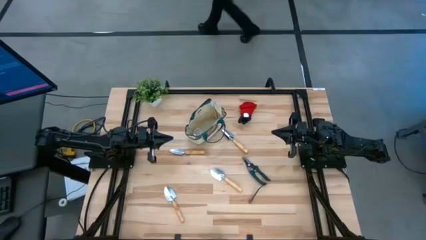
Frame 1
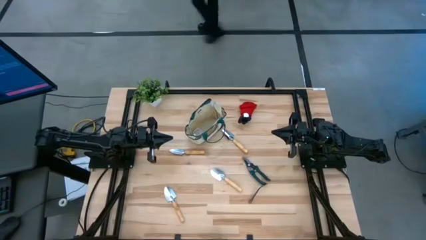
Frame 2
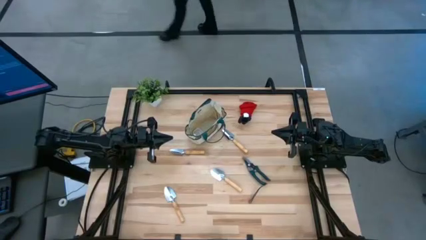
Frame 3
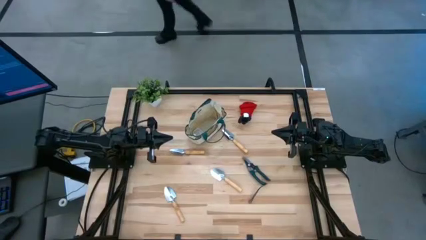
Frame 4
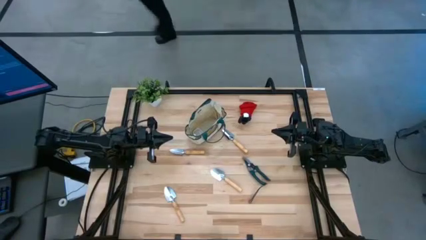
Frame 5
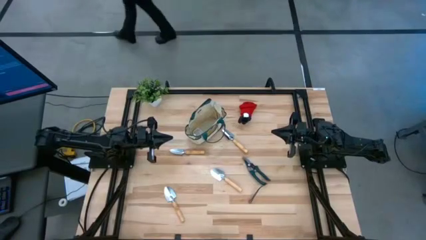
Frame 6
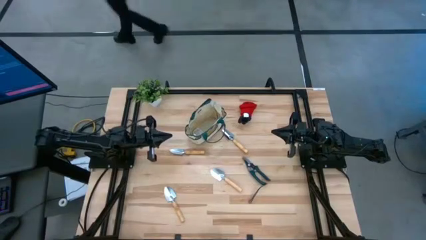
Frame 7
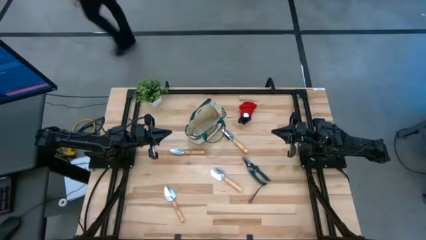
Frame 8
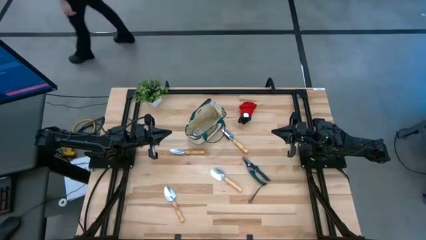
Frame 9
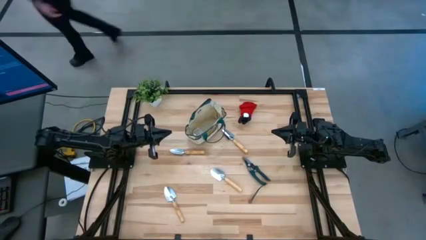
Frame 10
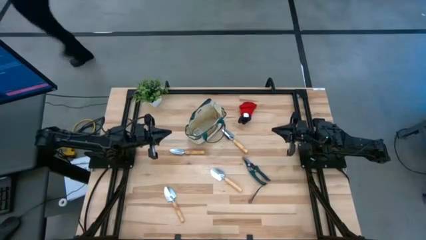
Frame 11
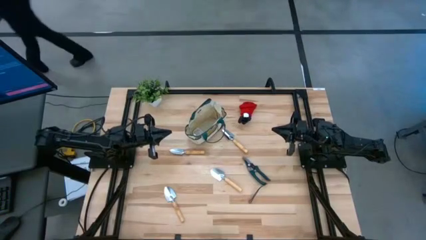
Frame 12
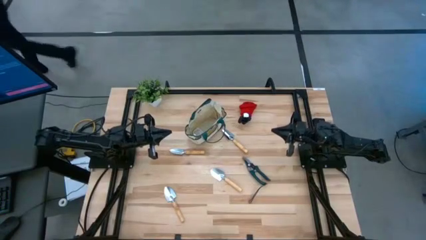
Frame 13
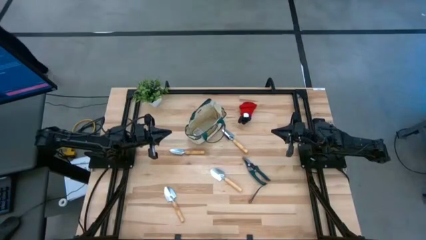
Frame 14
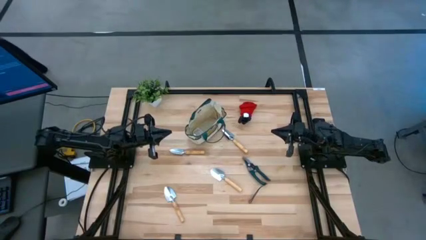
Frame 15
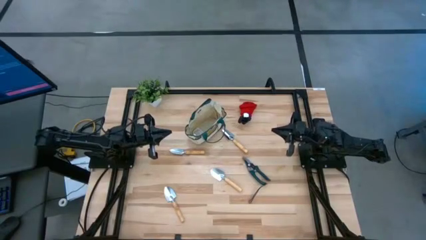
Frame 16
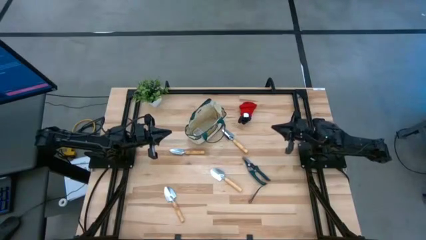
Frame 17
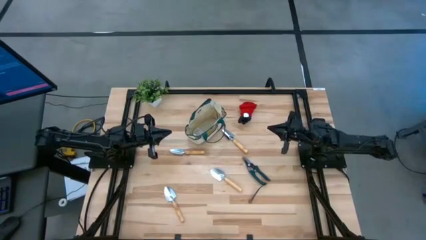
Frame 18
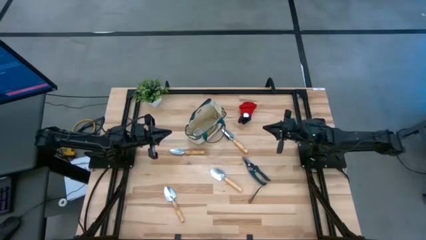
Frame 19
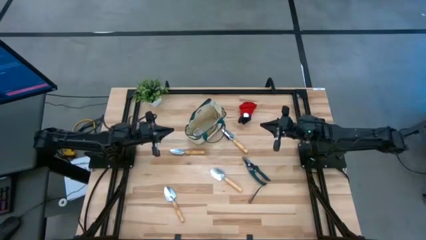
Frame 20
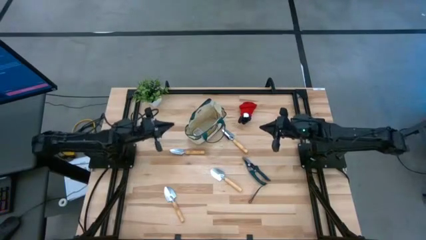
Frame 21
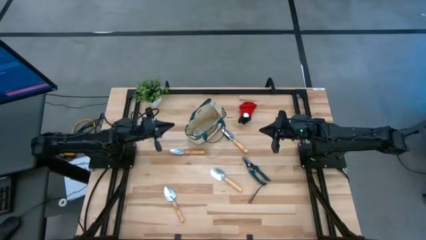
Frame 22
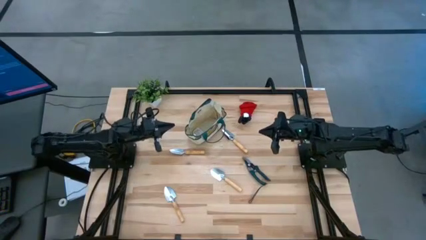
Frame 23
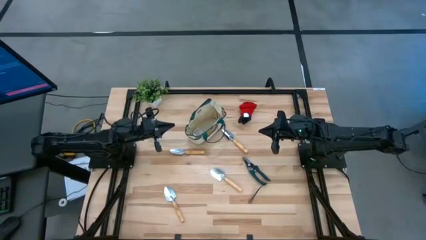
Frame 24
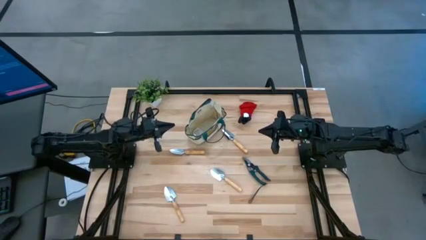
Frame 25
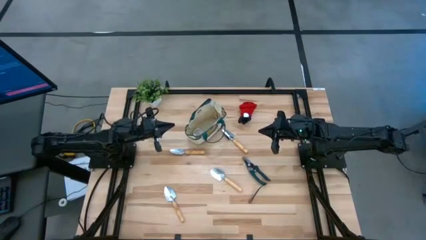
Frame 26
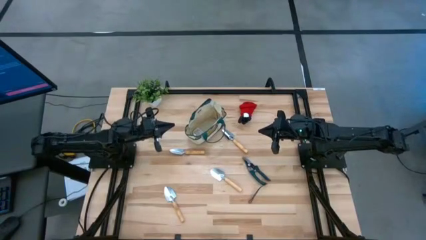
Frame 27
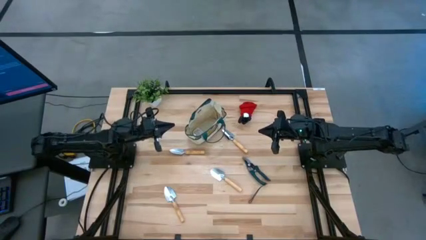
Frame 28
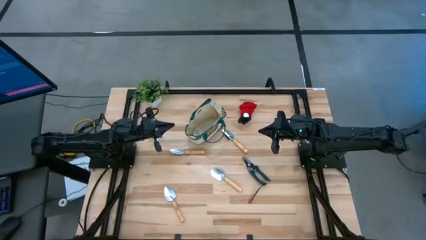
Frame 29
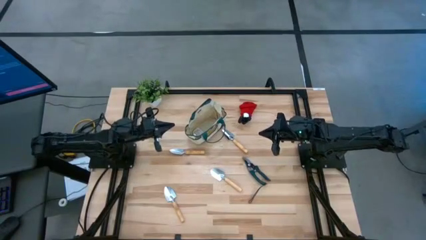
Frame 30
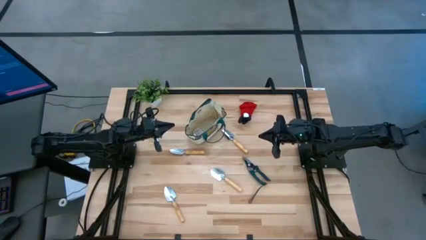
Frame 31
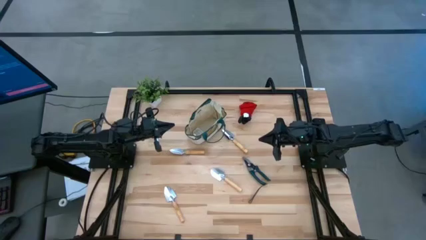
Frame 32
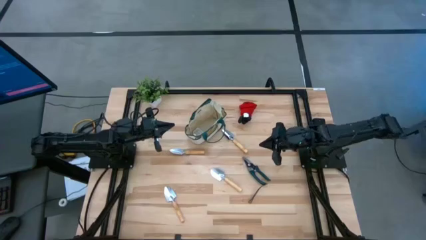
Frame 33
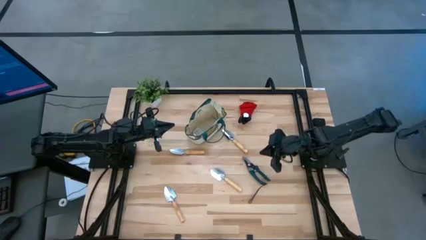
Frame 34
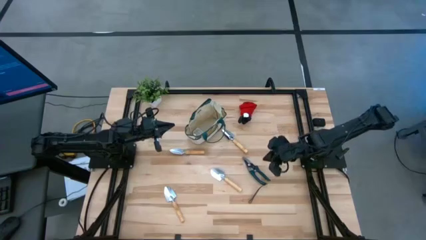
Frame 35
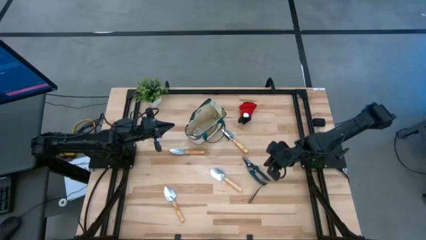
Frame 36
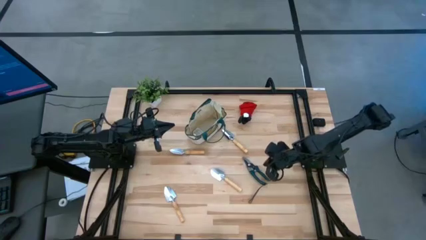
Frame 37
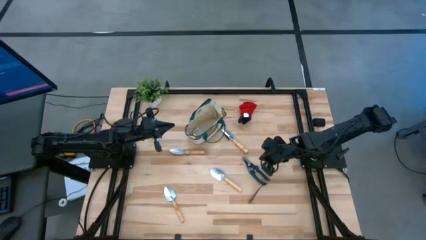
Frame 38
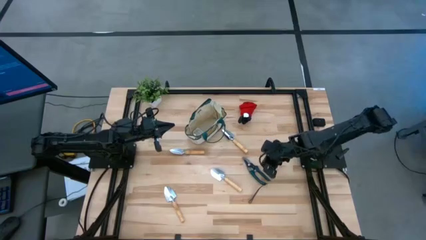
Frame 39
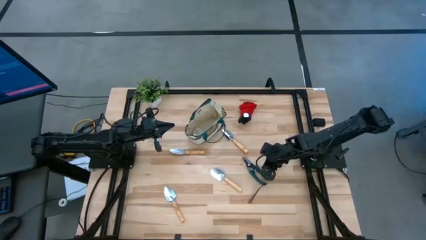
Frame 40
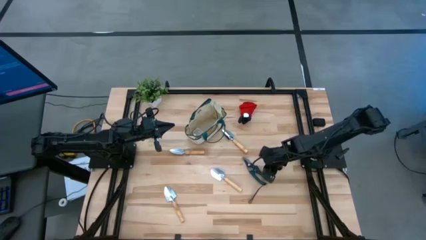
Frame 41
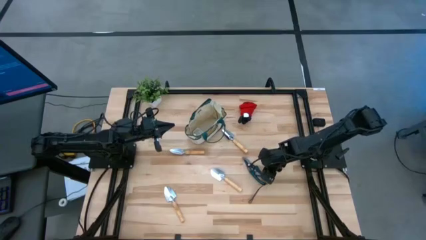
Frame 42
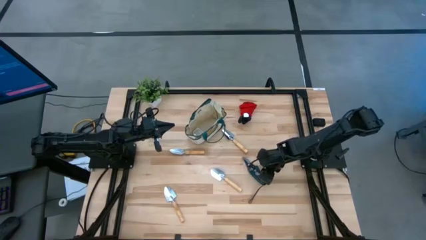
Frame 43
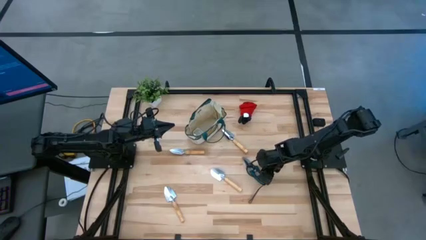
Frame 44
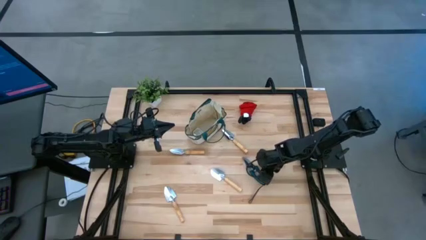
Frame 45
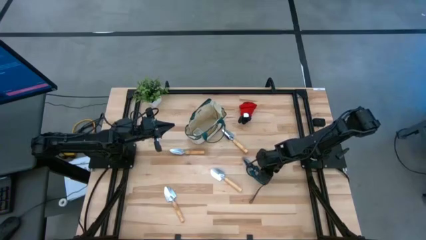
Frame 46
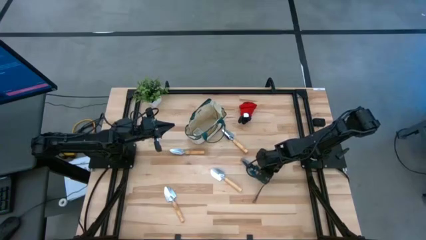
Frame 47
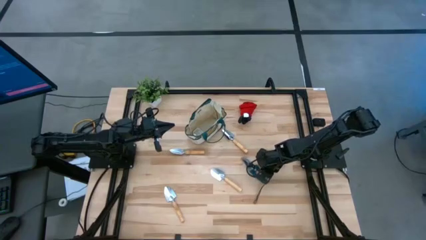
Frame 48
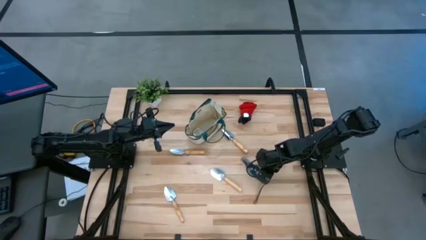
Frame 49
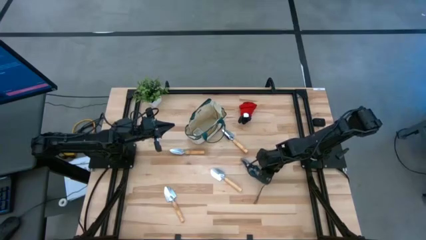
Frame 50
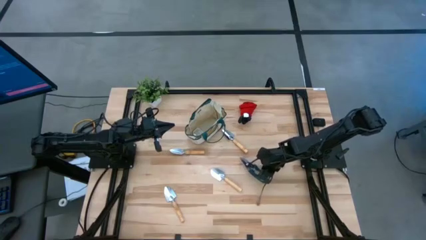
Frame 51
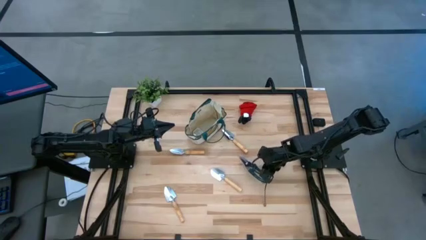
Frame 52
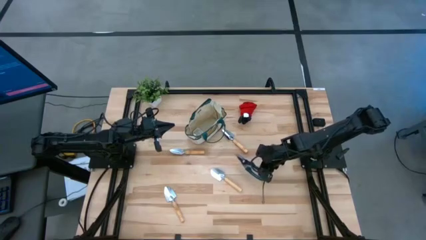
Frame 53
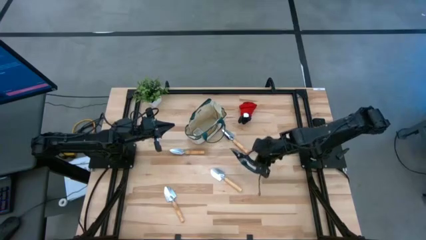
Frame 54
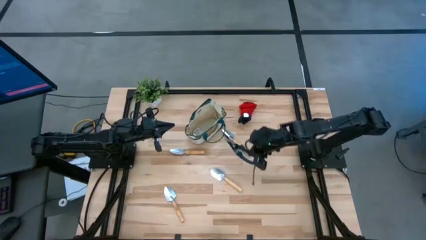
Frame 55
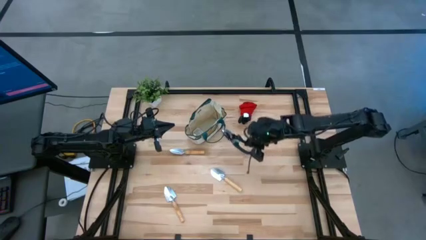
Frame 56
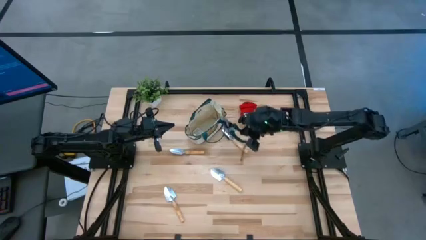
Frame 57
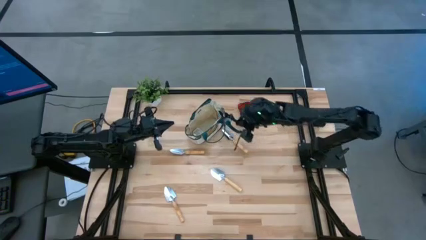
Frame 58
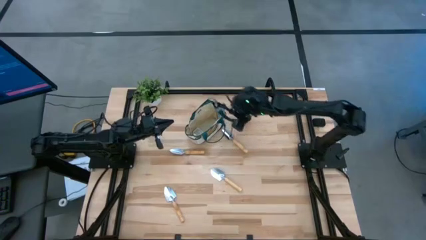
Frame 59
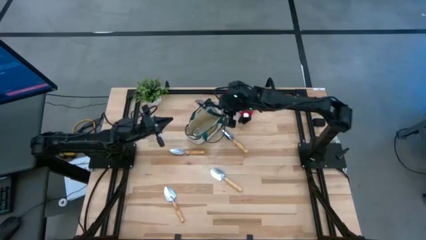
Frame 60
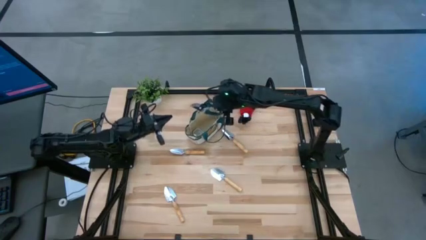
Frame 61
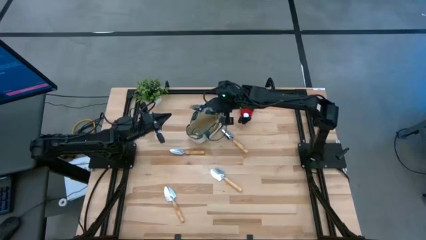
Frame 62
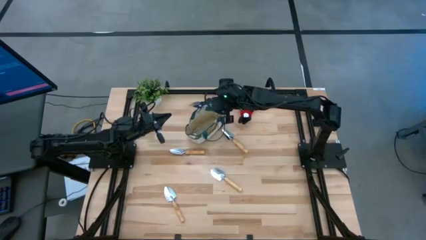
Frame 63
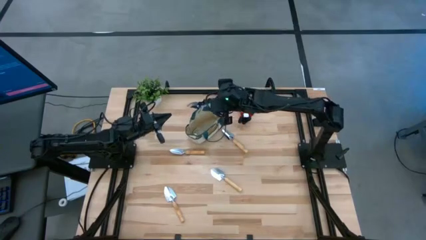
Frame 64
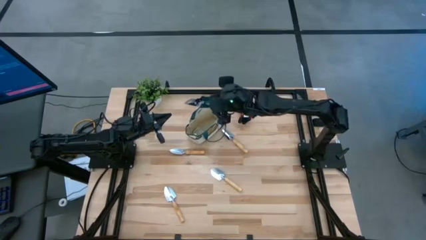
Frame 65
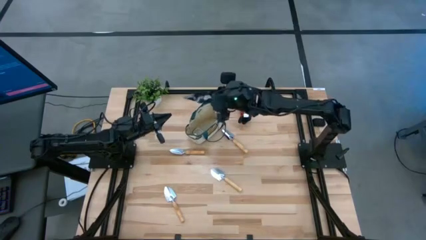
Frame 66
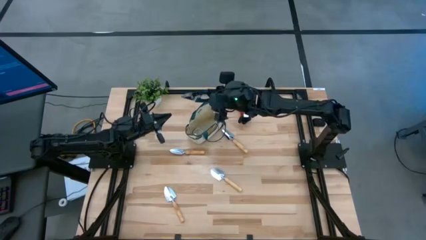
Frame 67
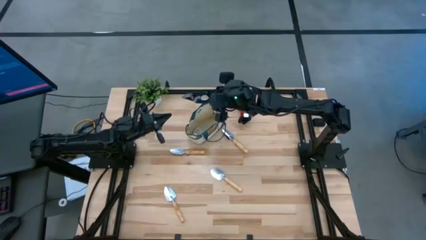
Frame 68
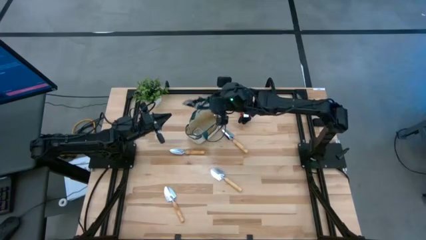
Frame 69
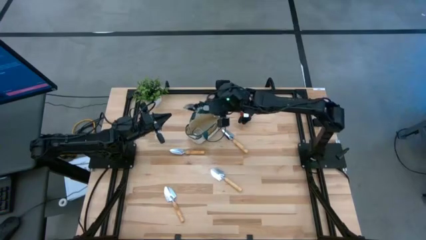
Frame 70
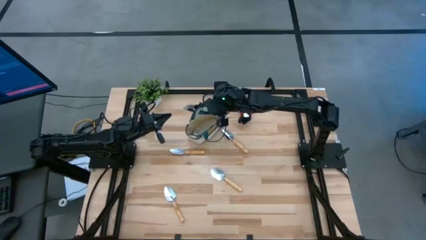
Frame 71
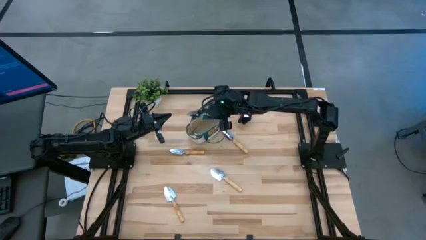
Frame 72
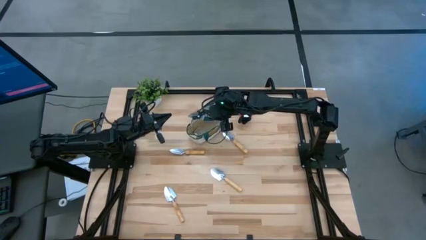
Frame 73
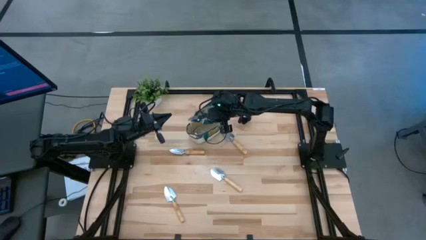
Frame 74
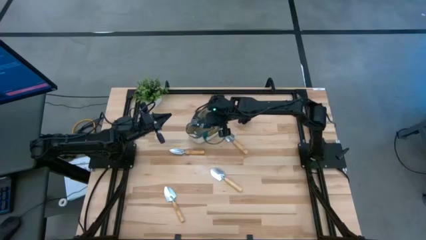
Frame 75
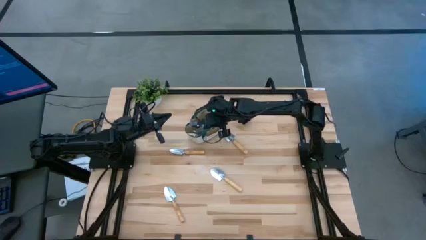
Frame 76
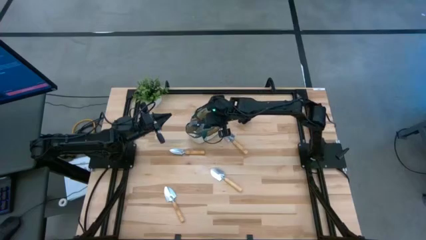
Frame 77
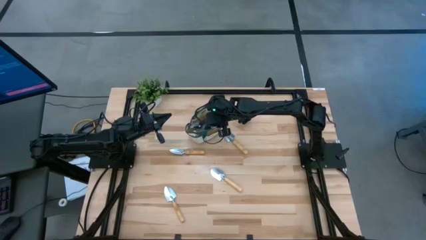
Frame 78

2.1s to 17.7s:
Task: Pick & Place Garden tools in Gardening bag
Put the shear scissor into the gardening bag
